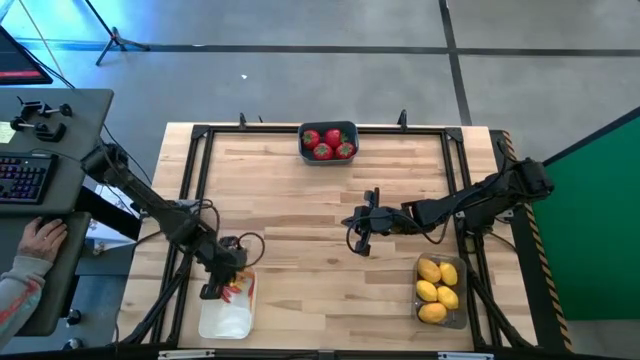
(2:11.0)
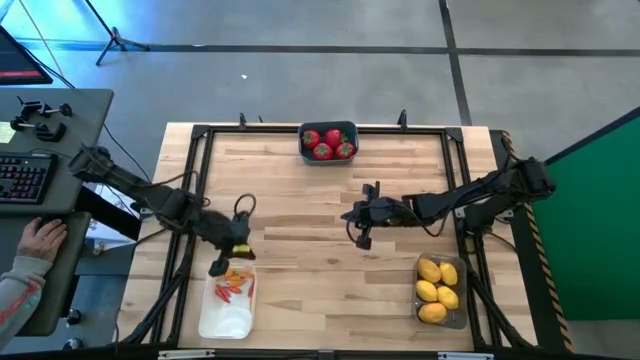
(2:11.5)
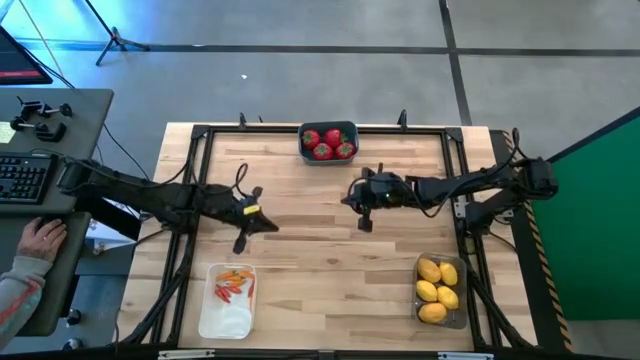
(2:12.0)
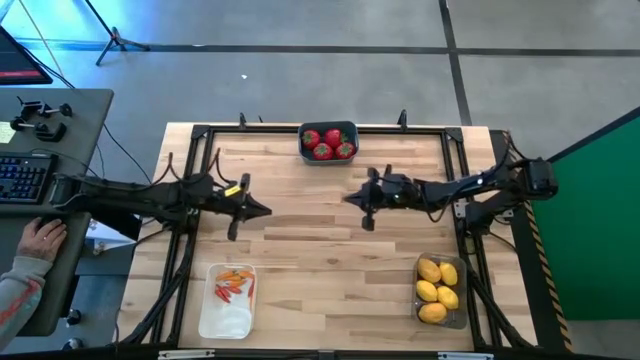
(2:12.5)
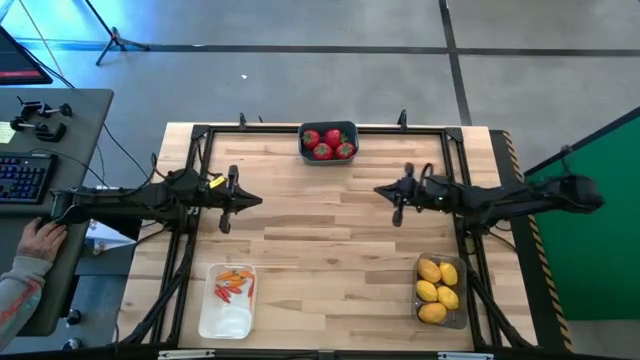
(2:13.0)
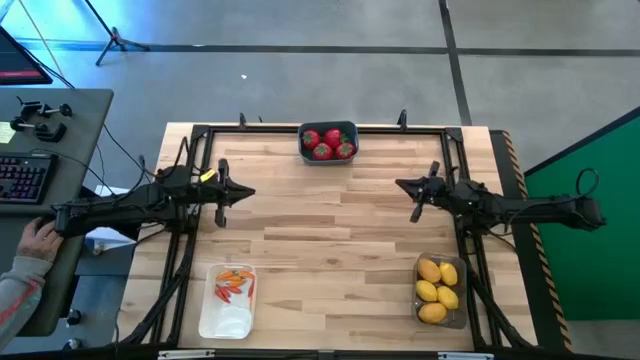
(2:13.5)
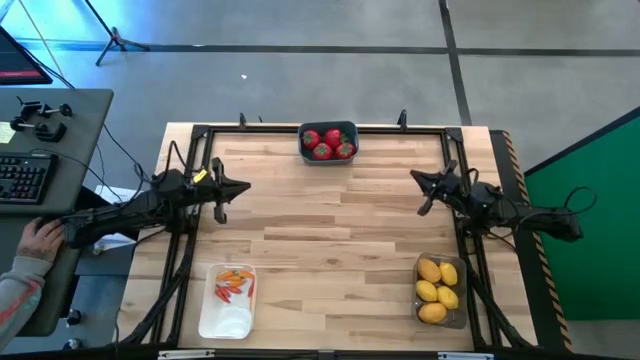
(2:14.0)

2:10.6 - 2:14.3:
Task: Sort produce into baskets
Return to Home Position

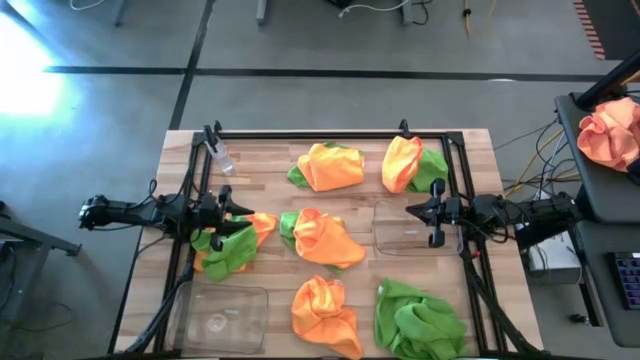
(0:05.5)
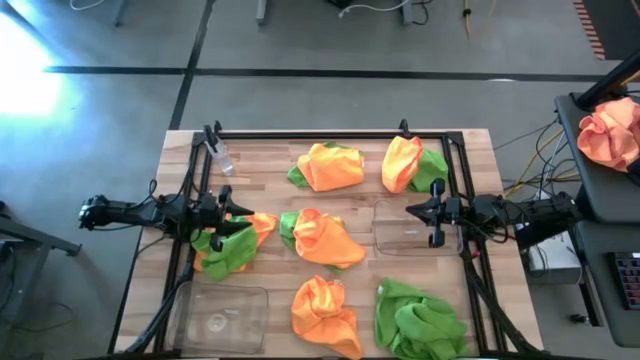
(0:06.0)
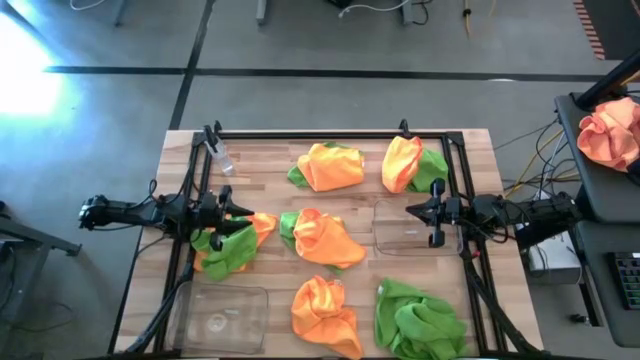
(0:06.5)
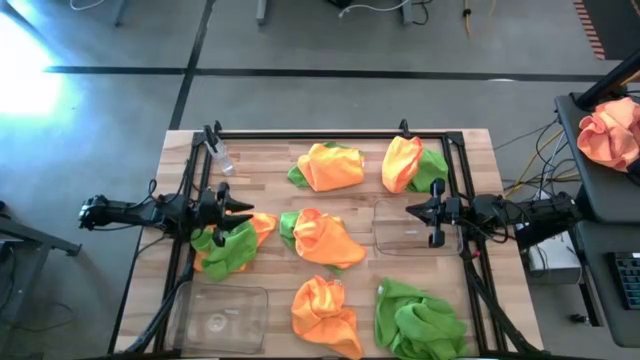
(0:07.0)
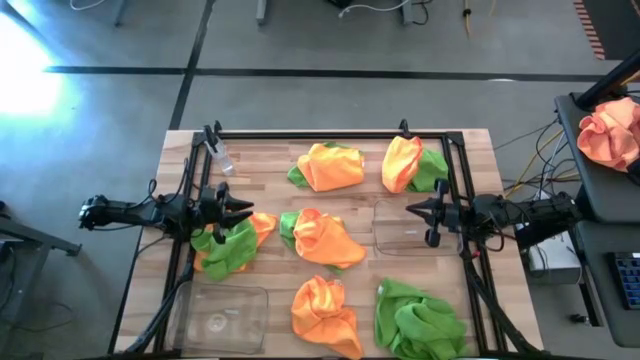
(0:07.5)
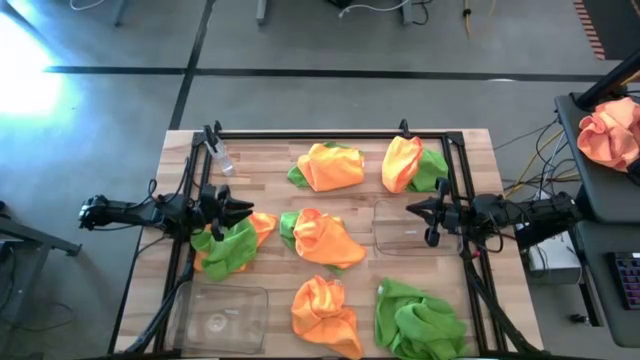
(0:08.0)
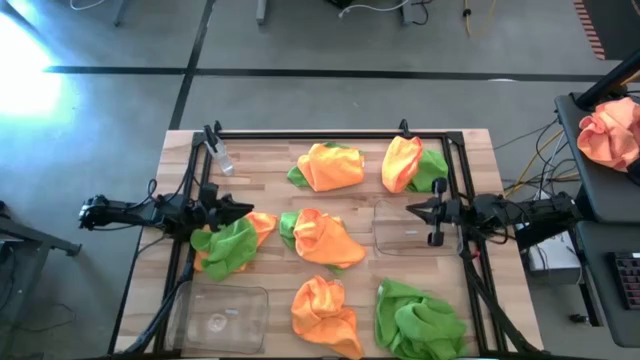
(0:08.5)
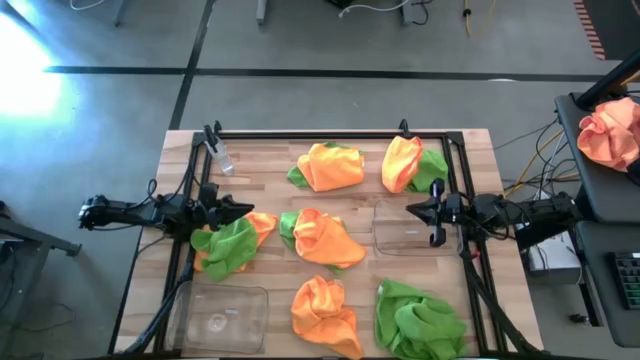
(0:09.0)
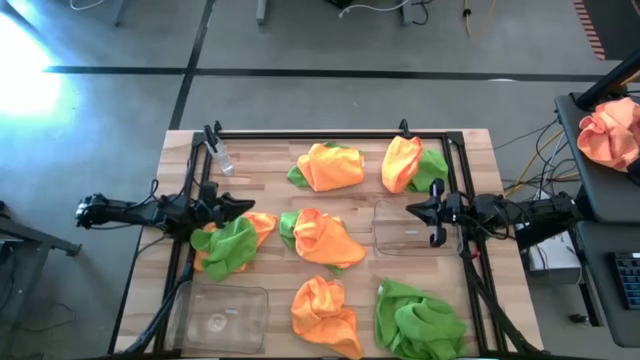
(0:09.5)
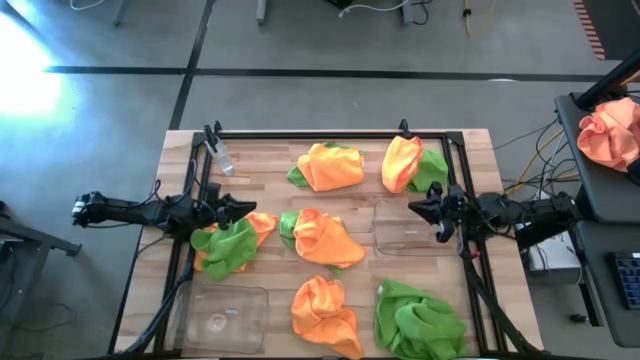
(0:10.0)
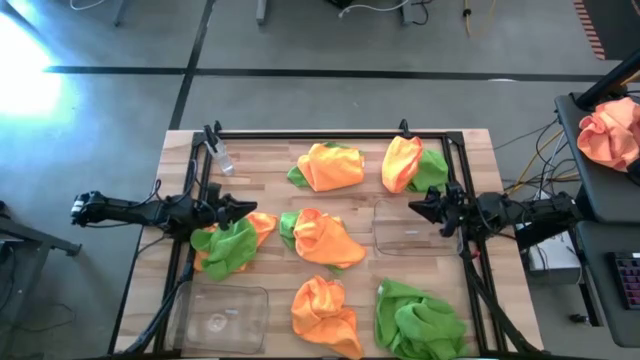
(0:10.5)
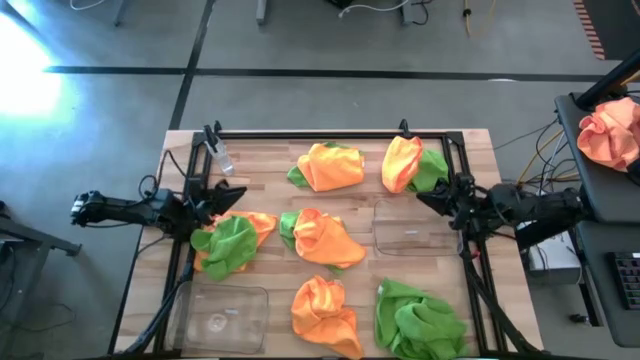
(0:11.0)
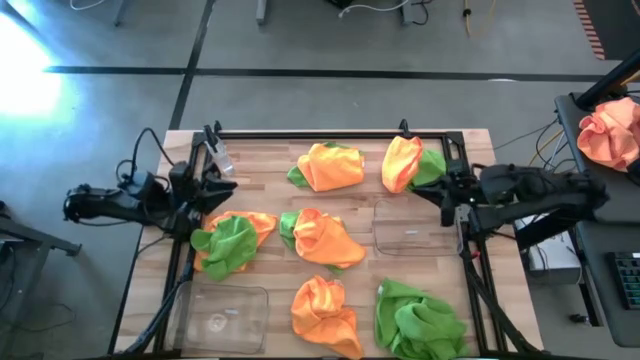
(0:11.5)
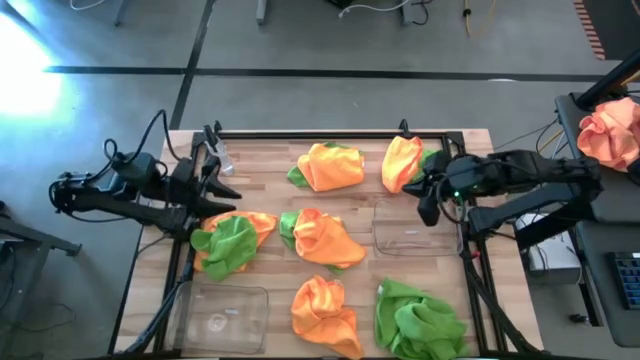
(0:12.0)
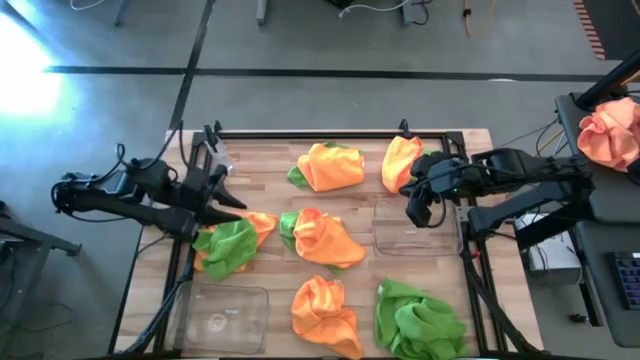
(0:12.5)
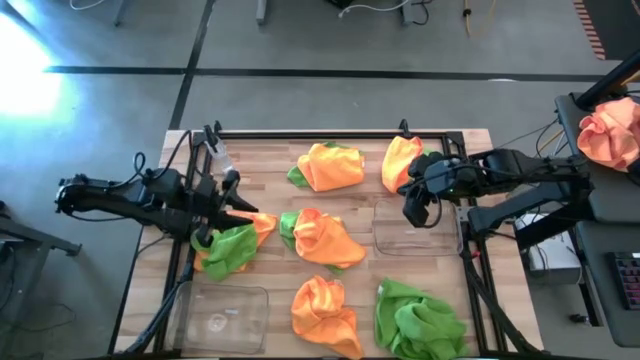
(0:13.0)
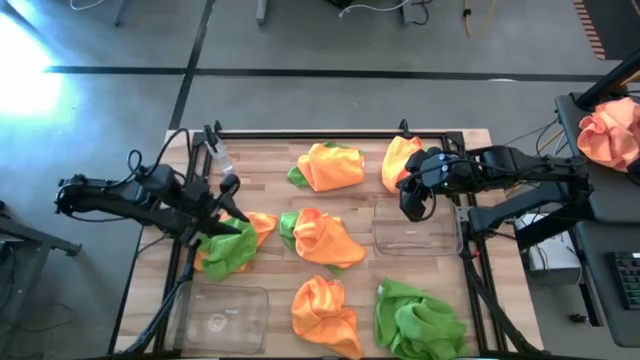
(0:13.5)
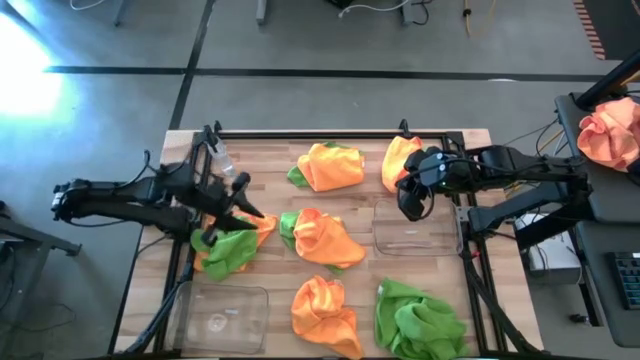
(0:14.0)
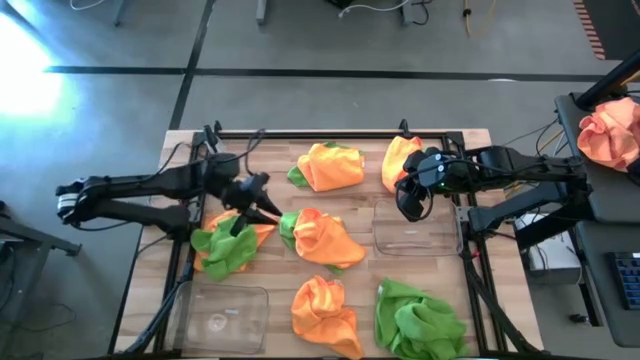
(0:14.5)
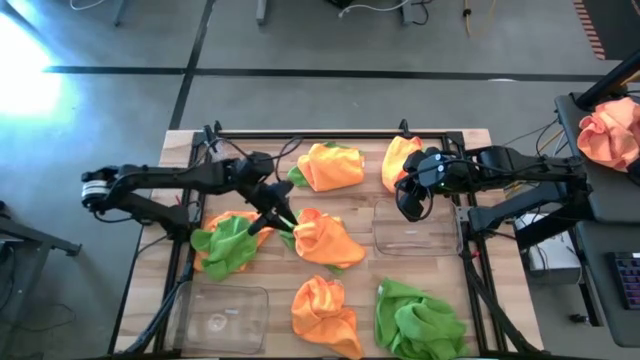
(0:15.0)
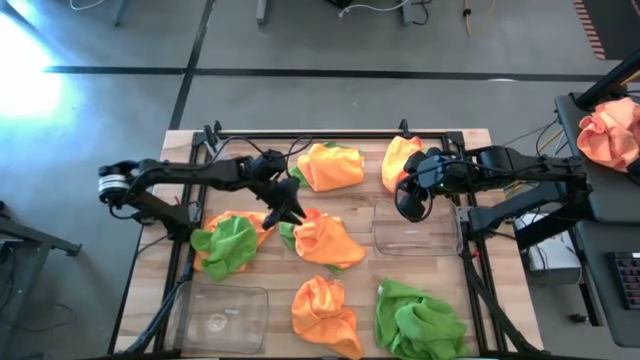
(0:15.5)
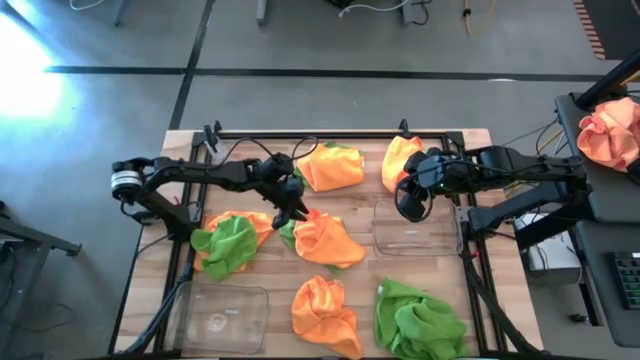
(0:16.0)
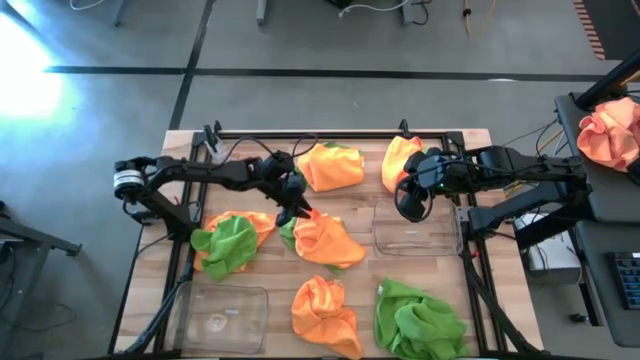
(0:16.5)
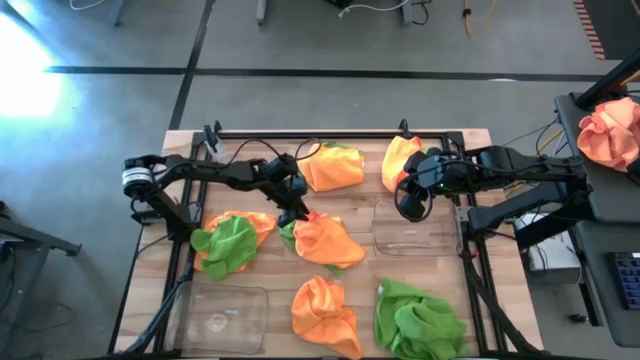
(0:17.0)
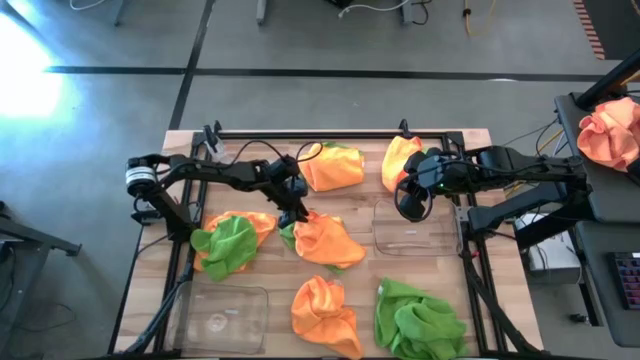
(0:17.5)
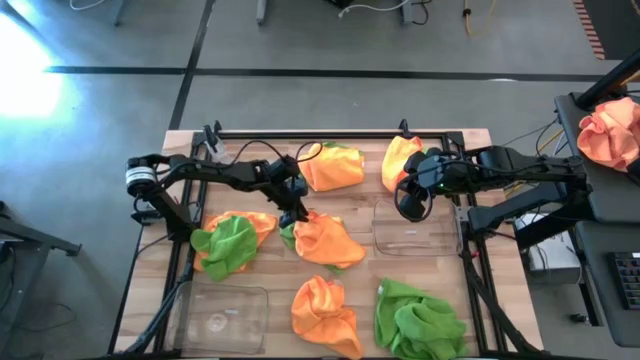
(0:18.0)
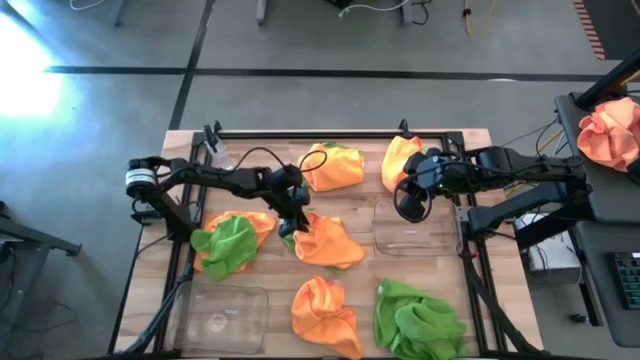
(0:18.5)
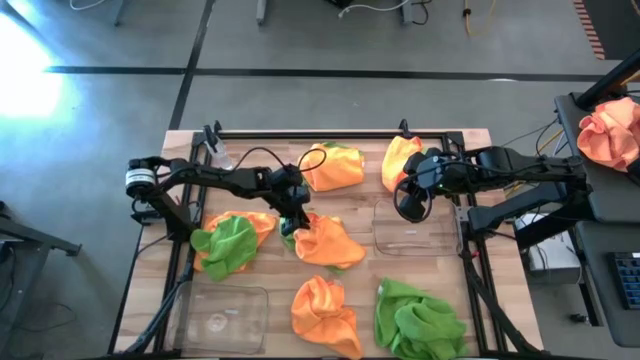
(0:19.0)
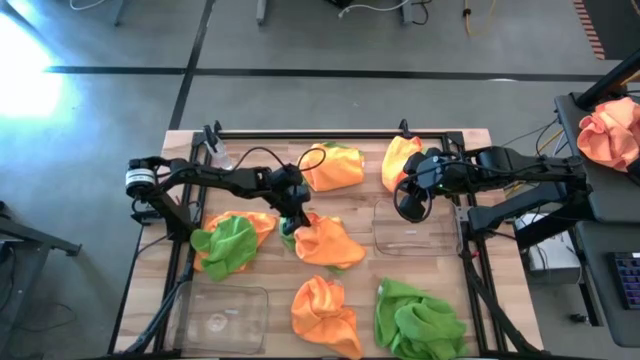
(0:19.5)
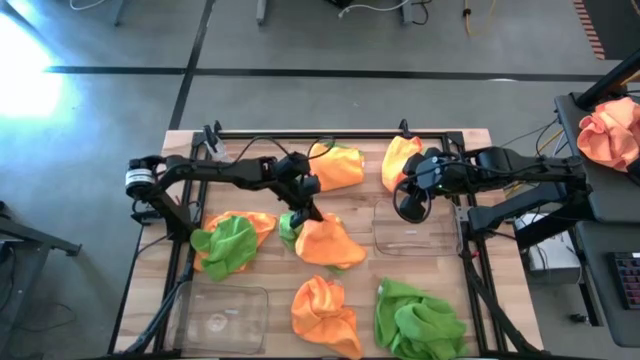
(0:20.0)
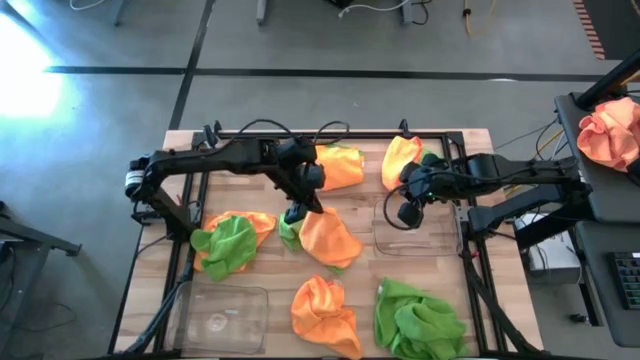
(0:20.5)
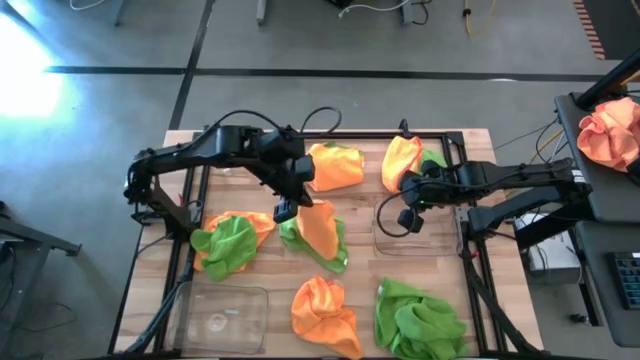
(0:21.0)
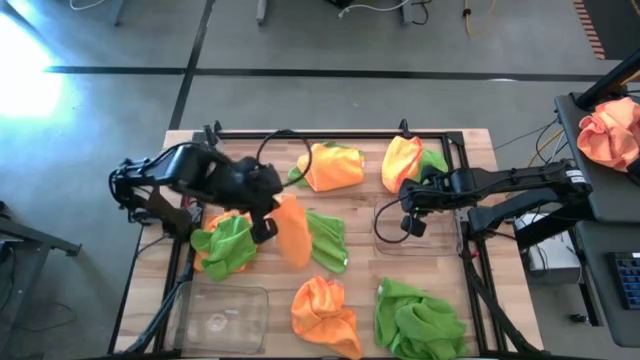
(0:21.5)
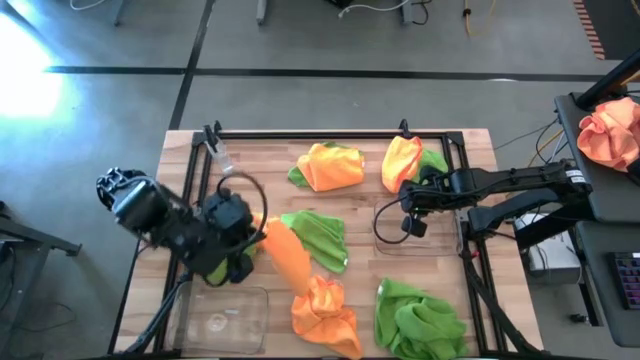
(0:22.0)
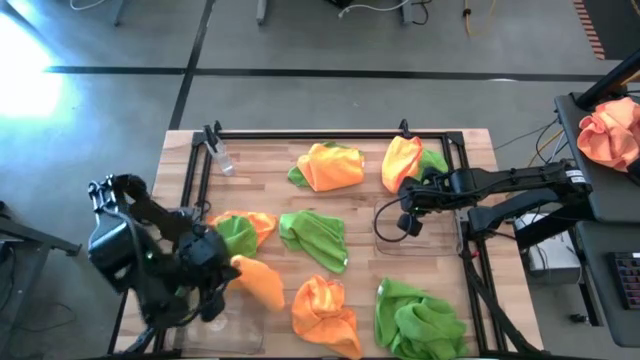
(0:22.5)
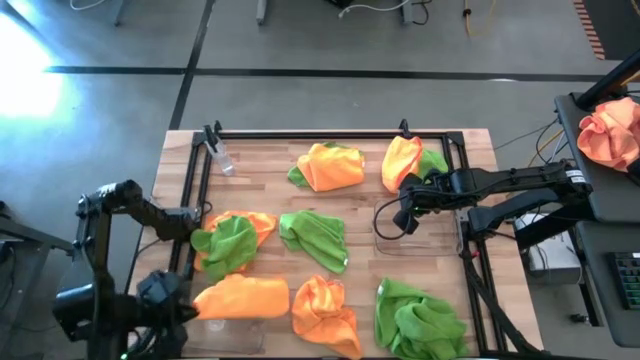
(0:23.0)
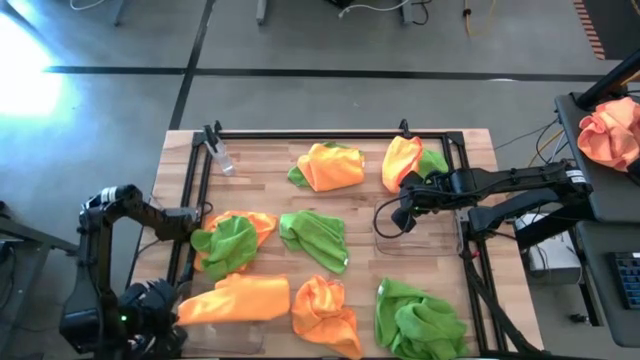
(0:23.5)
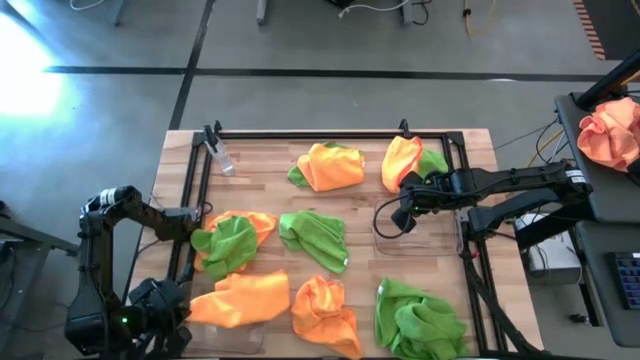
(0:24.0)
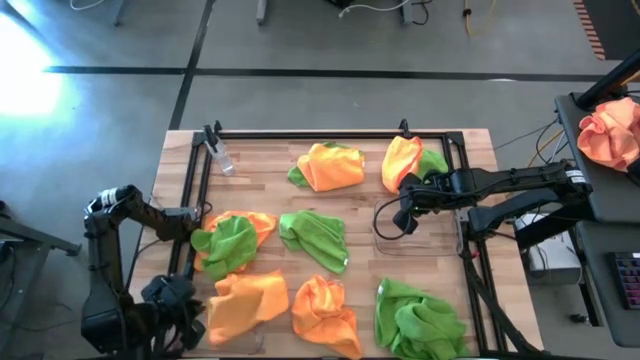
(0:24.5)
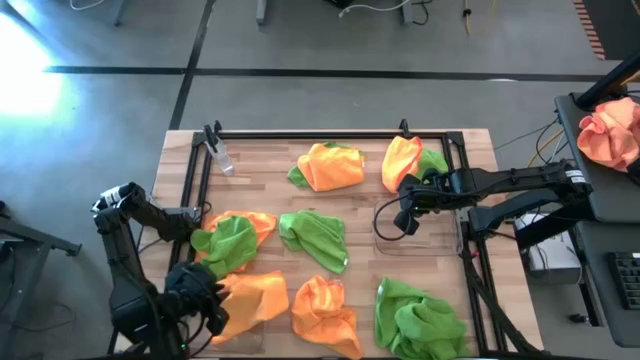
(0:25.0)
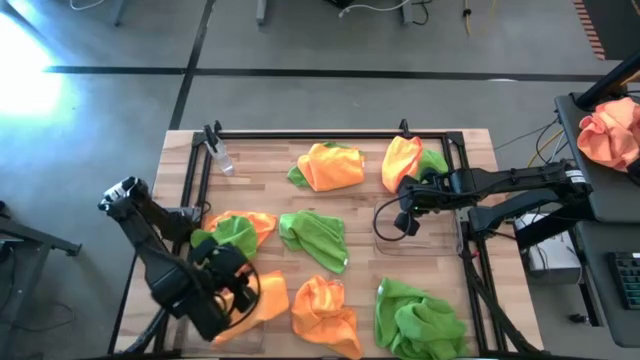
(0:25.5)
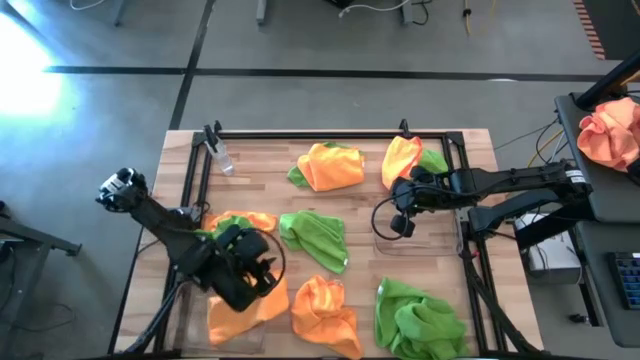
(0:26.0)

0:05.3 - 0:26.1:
Task: Sort microfiber towel by color & place in baskets
Put the center yellow towel into the left transparent bin
